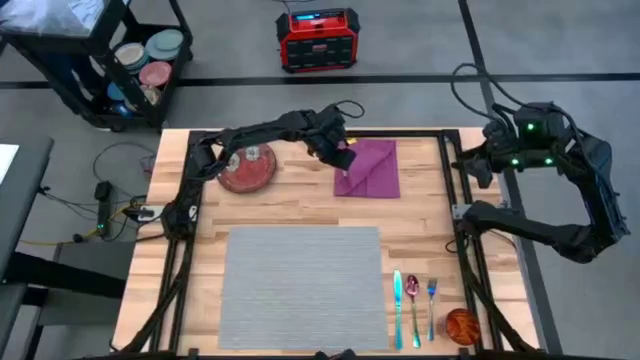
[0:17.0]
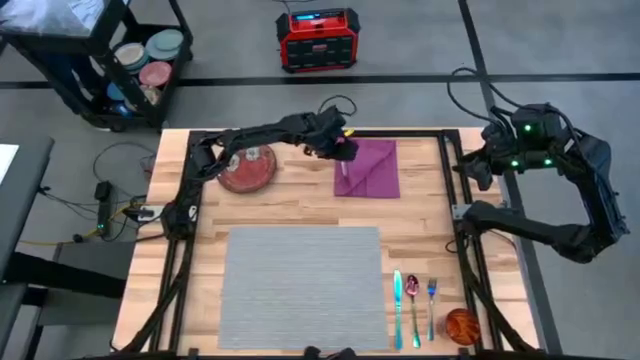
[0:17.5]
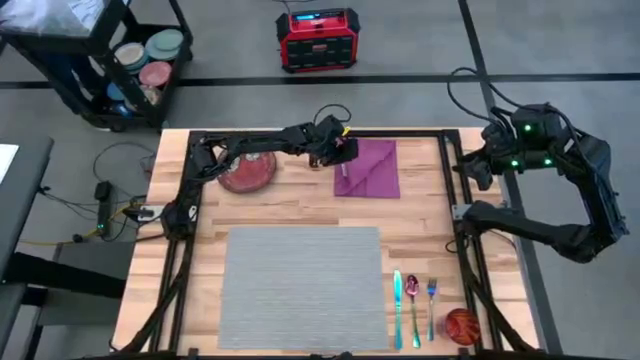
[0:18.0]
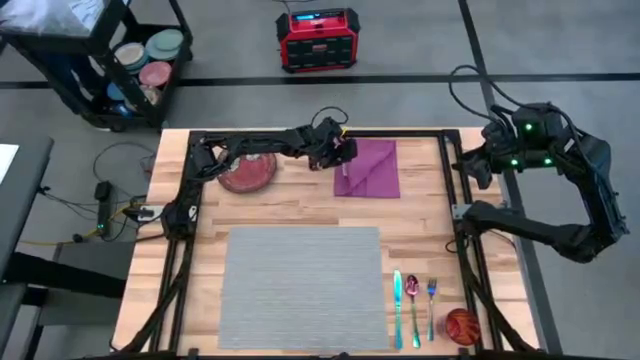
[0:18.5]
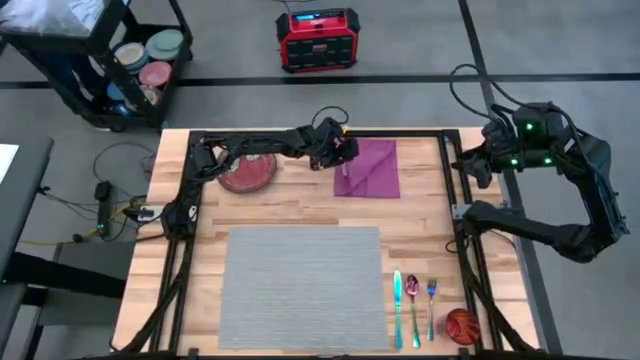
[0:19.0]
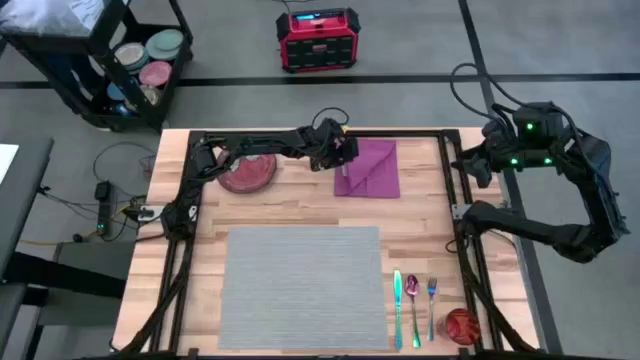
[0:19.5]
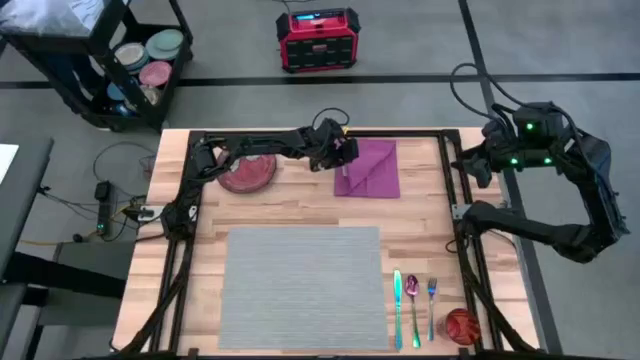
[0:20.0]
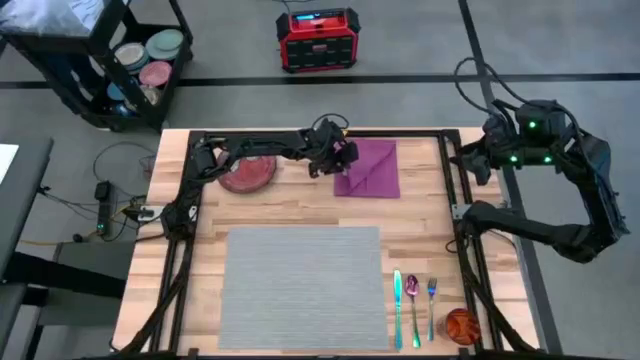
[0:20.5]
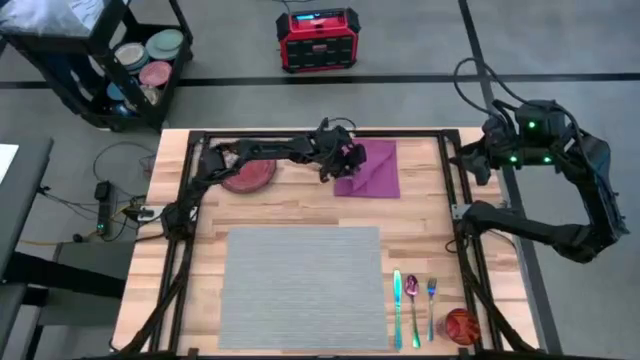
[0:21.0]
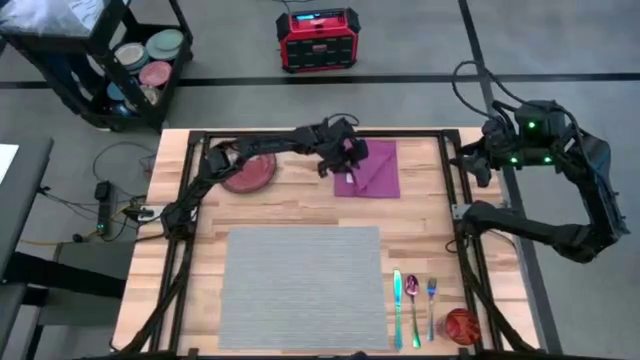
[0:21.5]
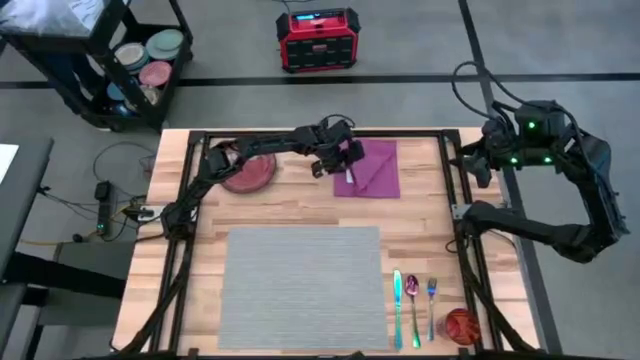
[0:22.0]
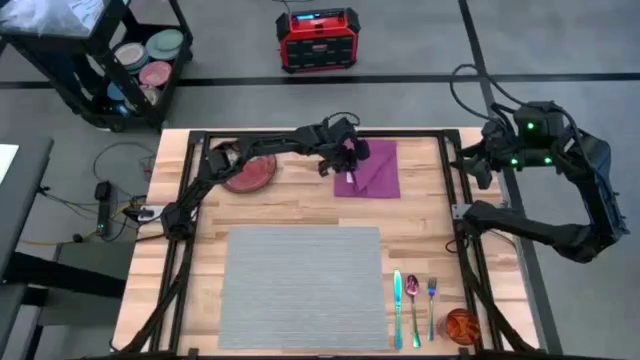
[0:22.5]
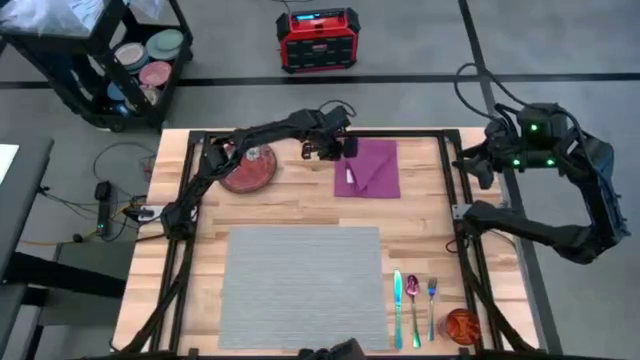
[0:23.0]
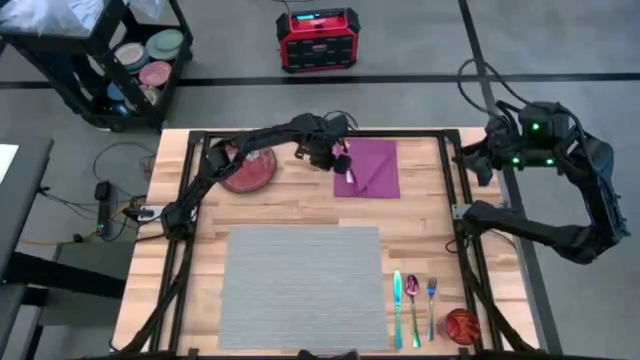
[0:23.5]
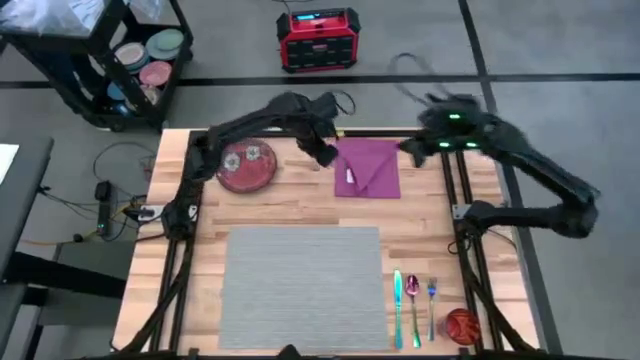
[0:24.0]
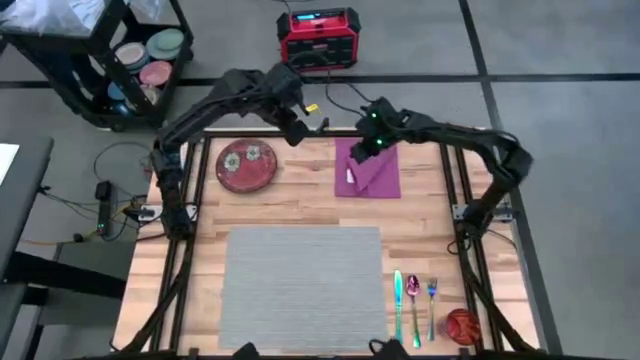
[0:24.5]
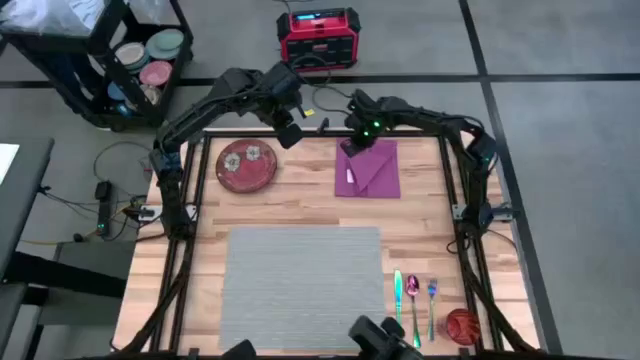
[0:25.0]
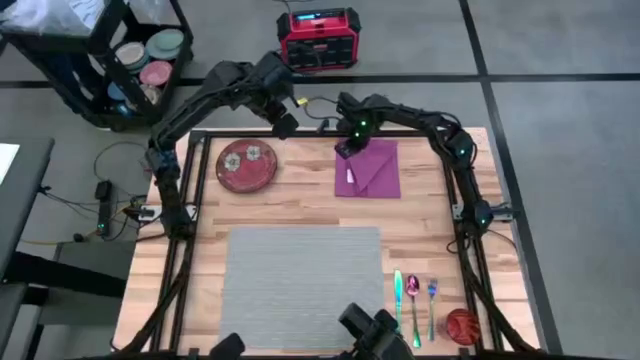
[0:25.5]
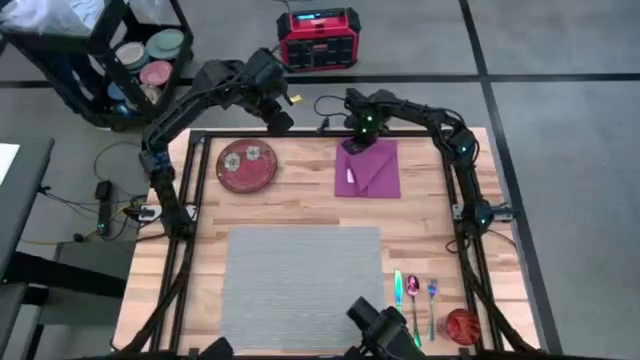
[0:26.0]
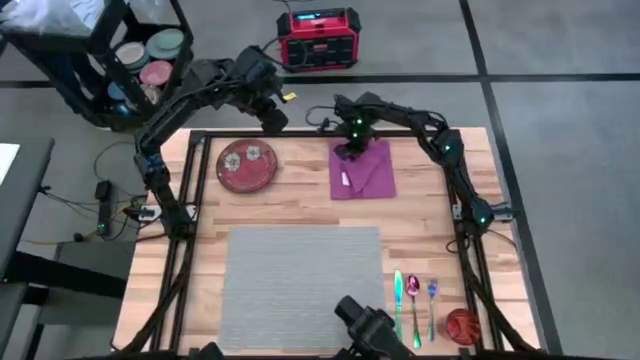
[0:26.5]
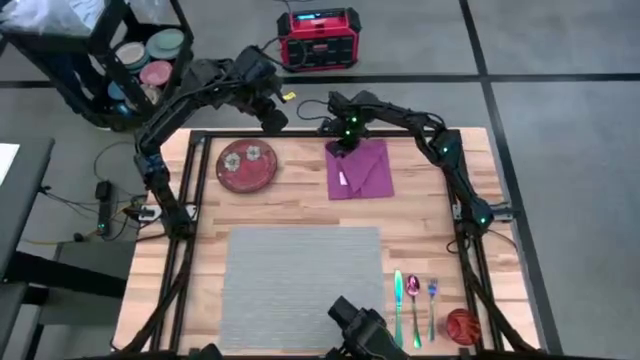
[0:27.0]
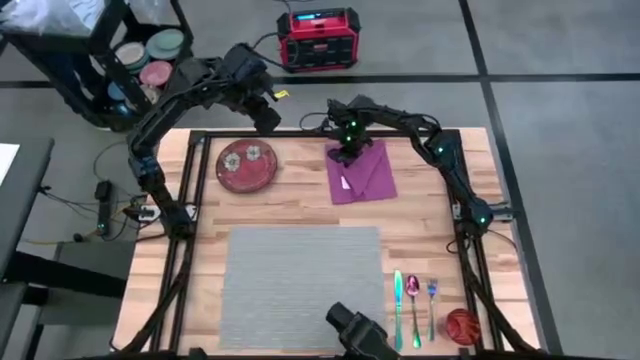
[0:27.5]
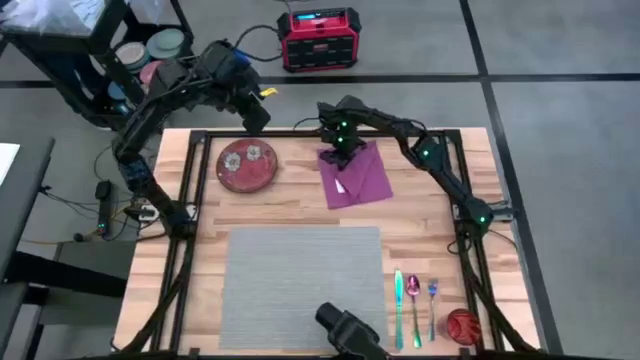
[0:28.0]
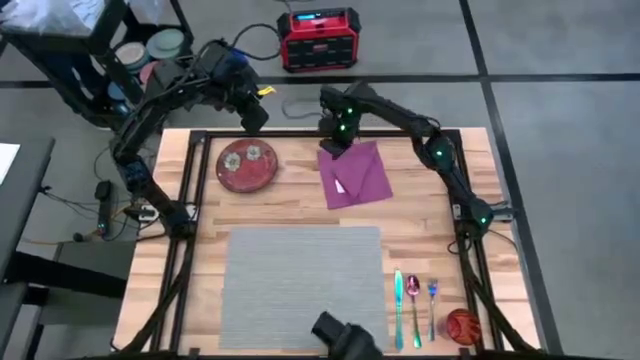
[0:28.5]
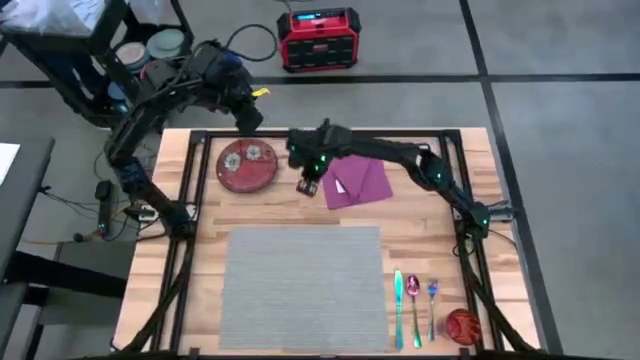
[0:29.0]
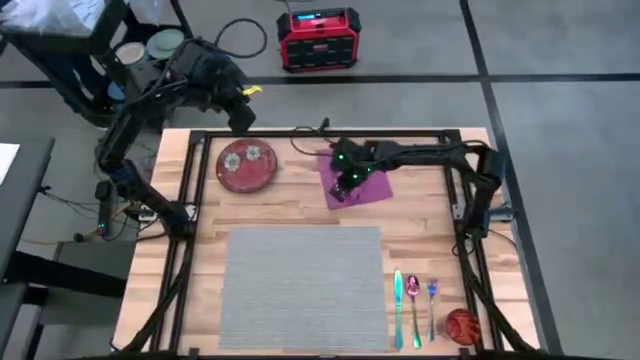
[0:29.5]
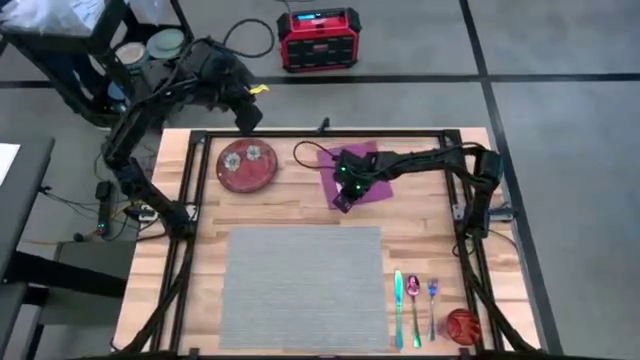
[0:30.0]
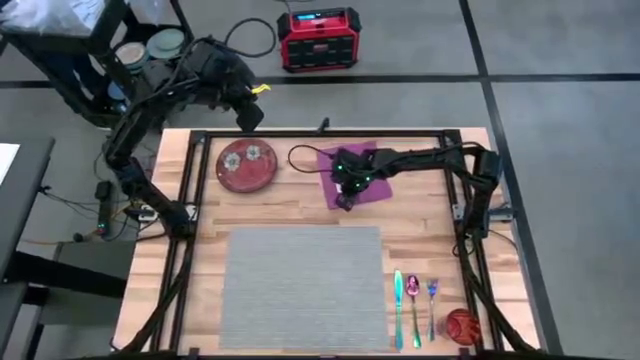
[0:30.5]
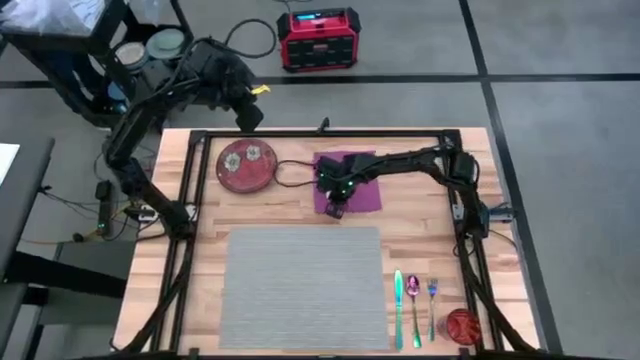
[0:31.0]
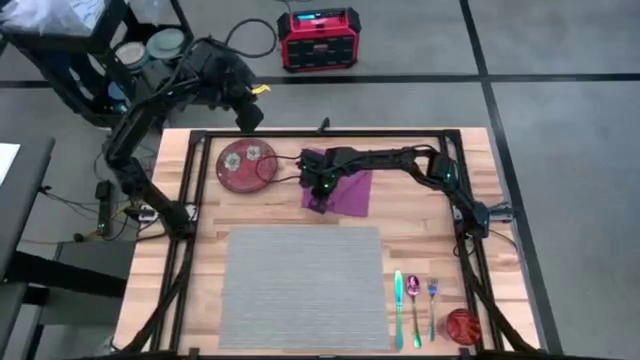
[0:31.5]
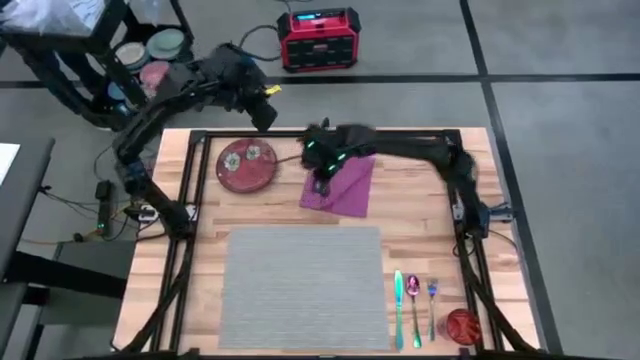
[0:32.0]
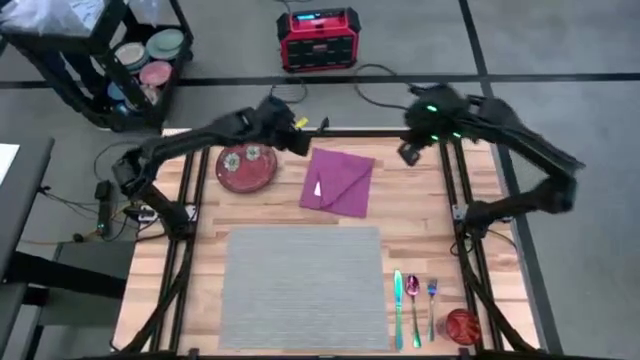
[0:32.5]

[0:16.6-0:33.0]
Task: Set table place
Fold the pink table towel

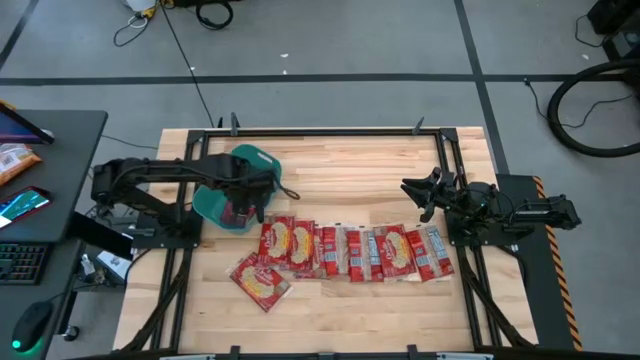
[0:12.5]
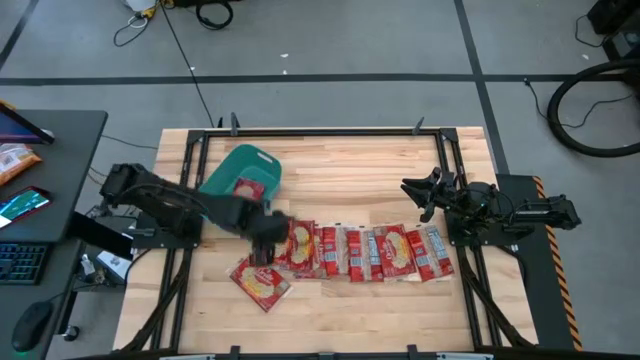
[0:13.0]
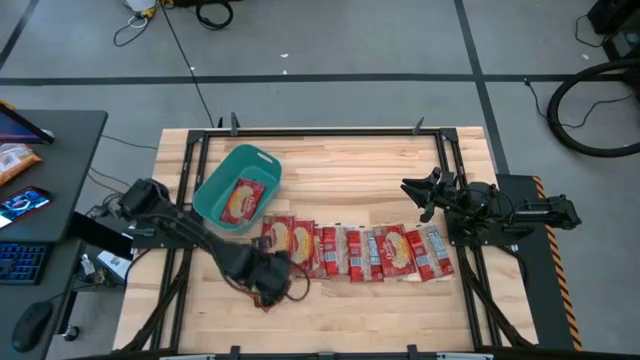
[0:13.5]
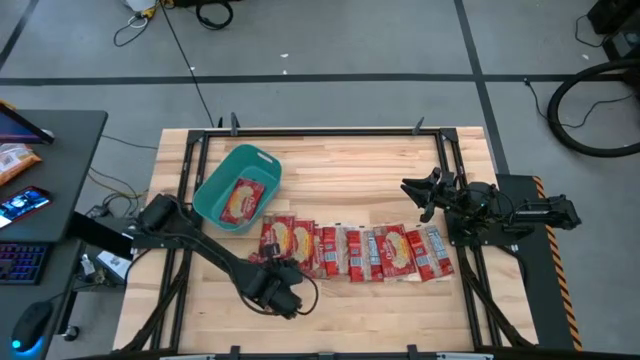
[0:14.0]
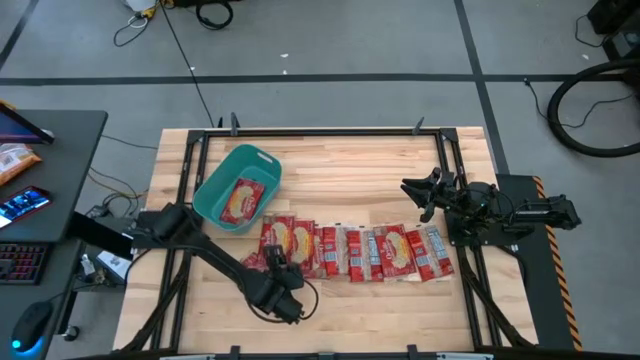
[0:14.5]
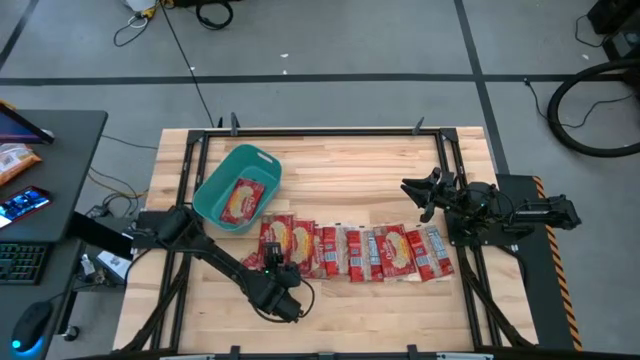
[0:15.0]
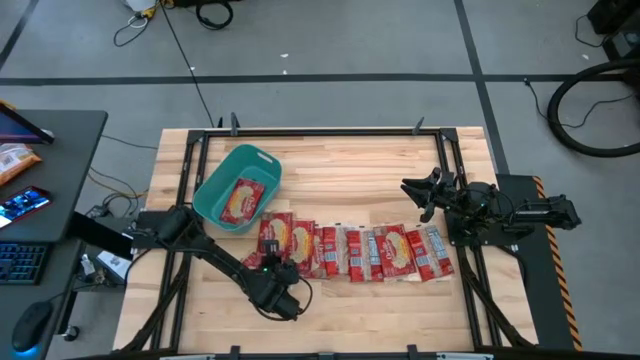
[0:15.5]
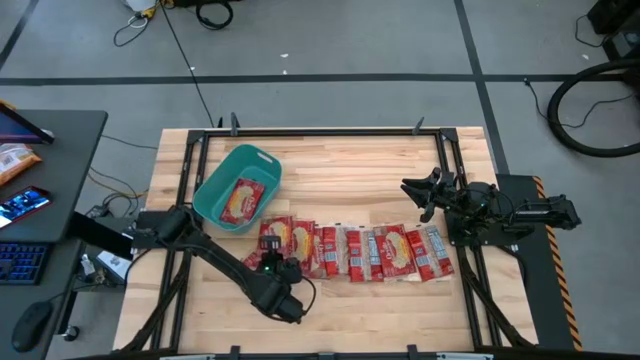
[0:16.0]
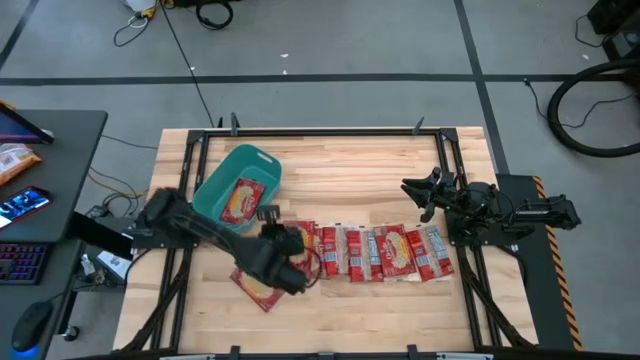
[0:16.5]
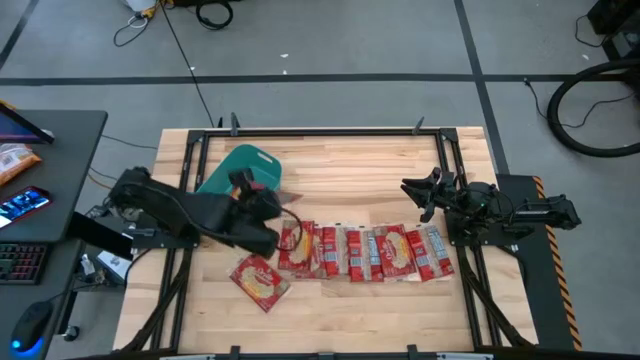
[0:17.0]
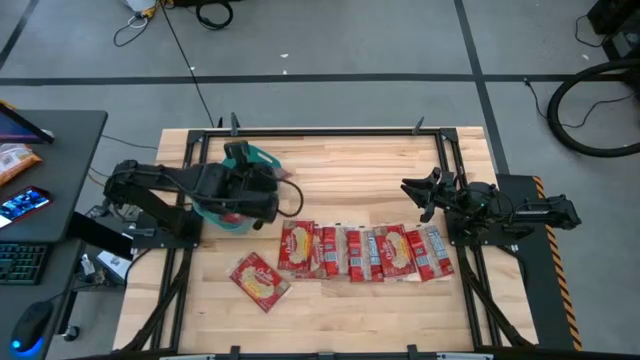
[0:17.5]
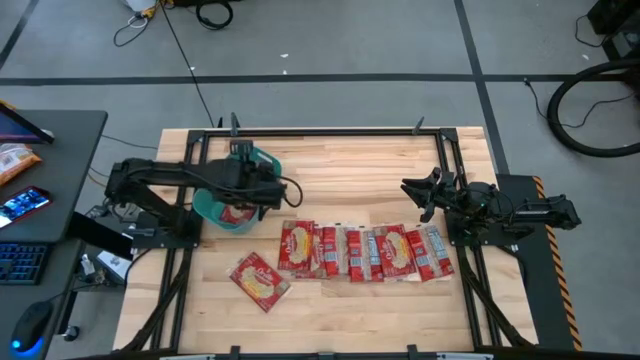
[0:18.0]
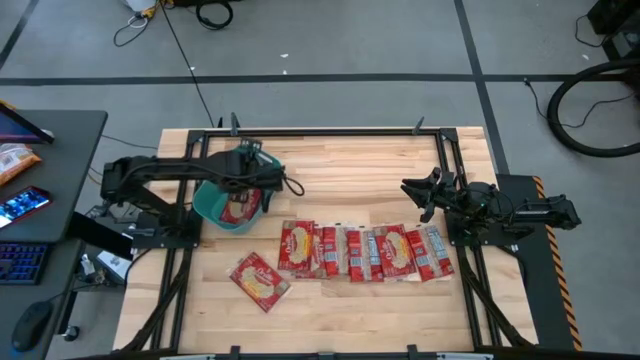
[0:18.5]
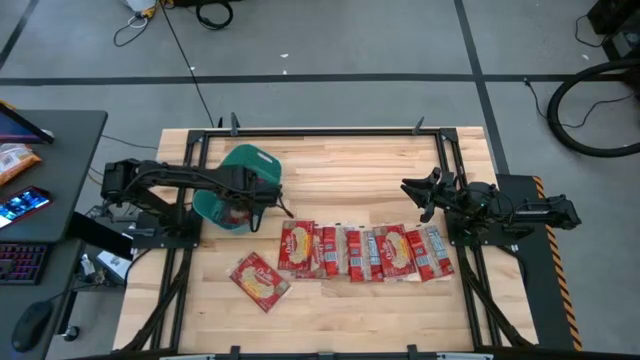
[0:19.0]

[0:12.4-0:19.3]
Task: Sort popcorn bags into baskets
Put the red popcorn bag into the green bin
